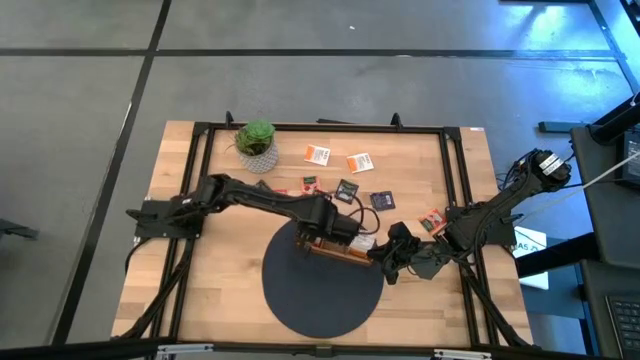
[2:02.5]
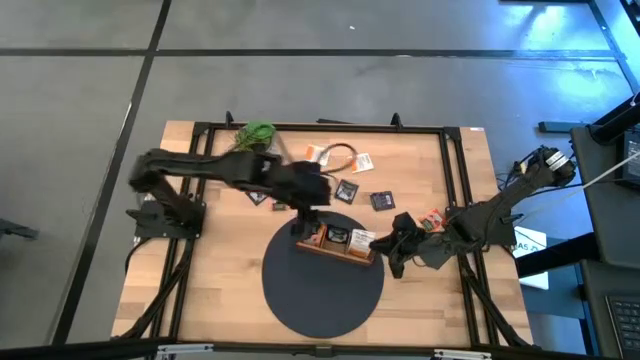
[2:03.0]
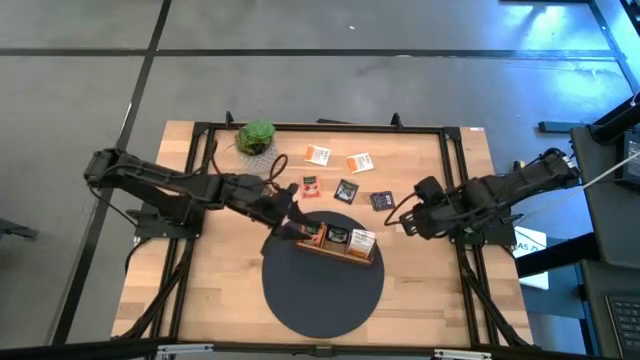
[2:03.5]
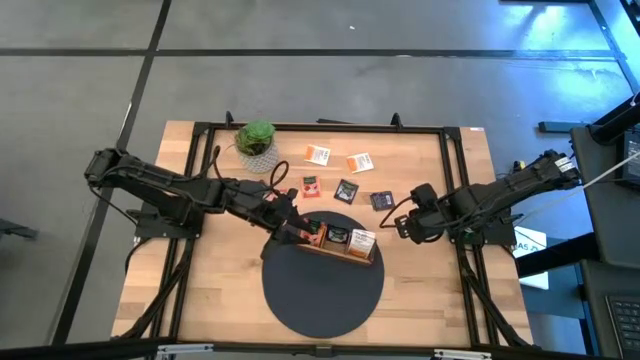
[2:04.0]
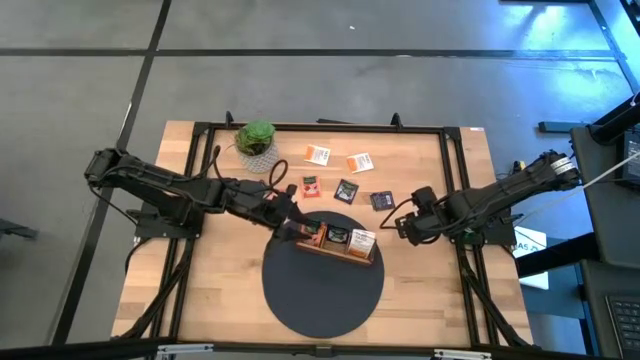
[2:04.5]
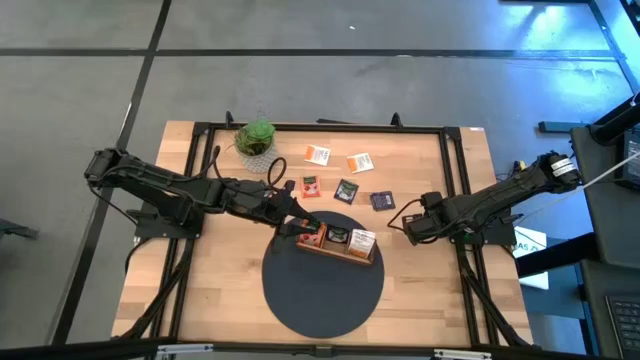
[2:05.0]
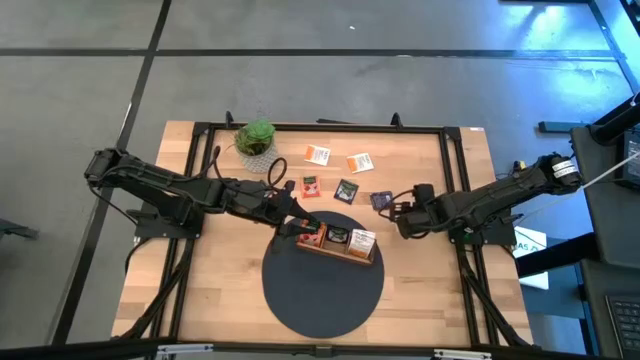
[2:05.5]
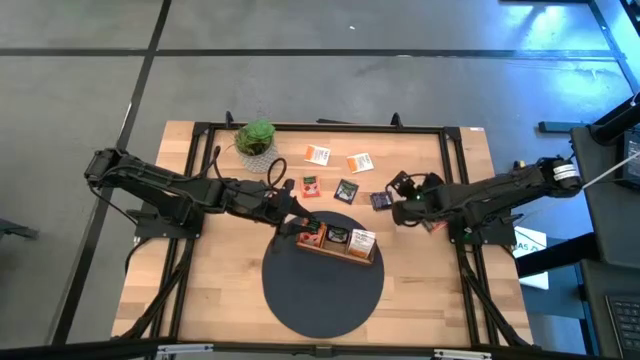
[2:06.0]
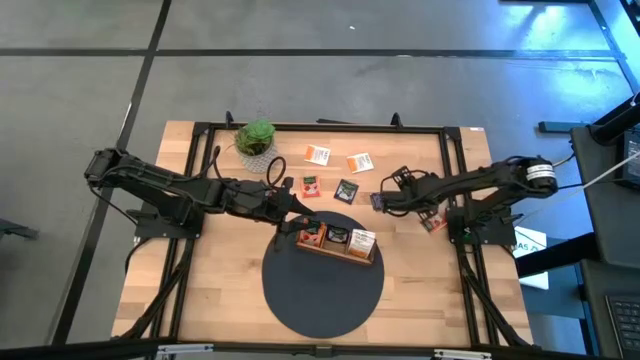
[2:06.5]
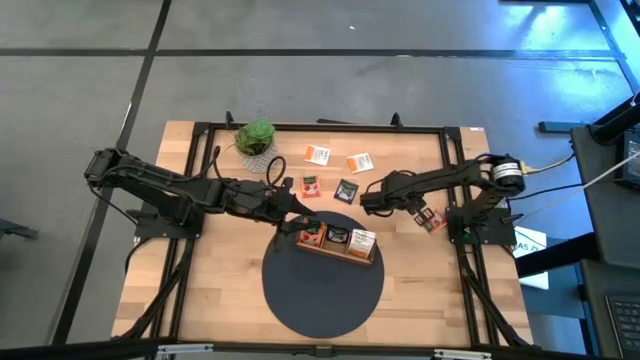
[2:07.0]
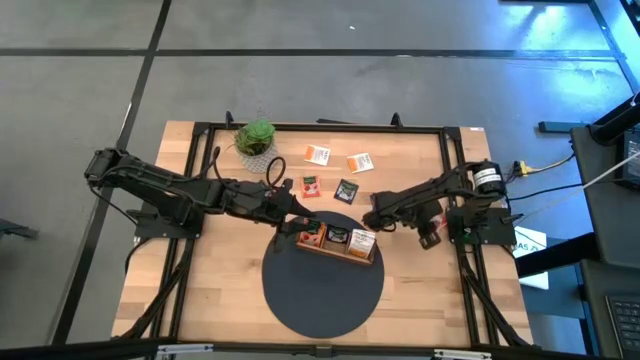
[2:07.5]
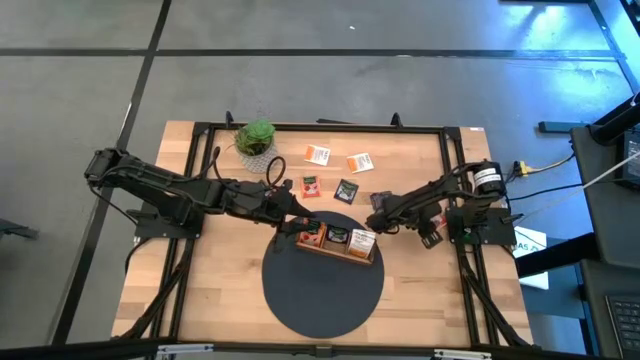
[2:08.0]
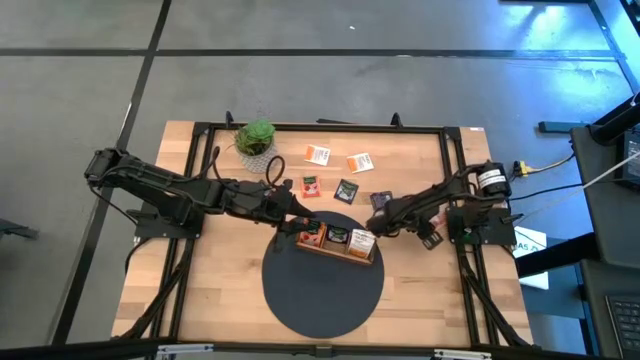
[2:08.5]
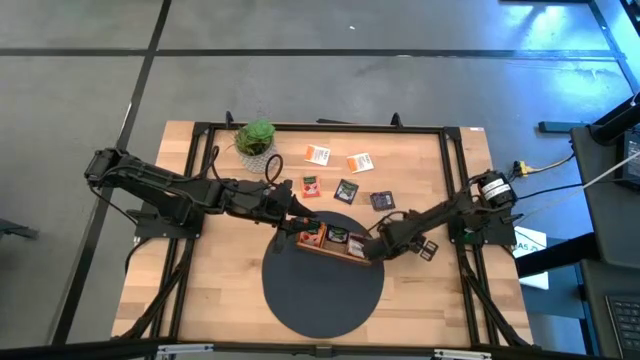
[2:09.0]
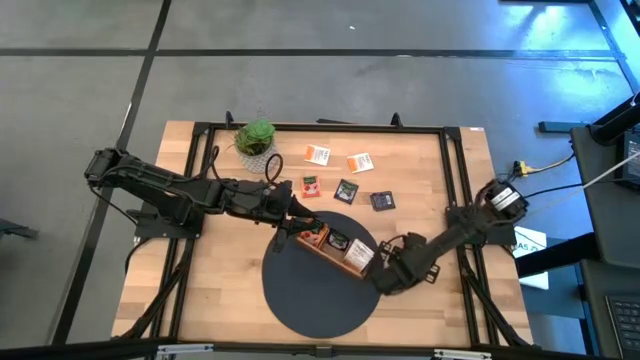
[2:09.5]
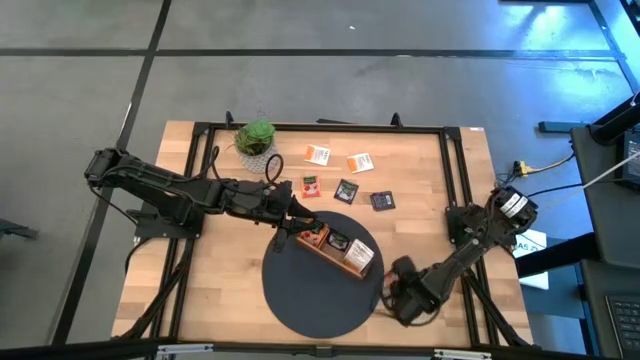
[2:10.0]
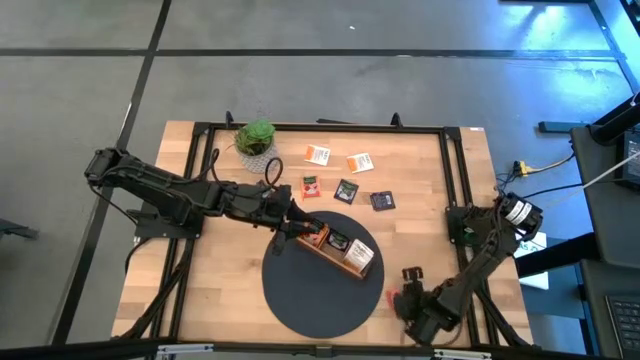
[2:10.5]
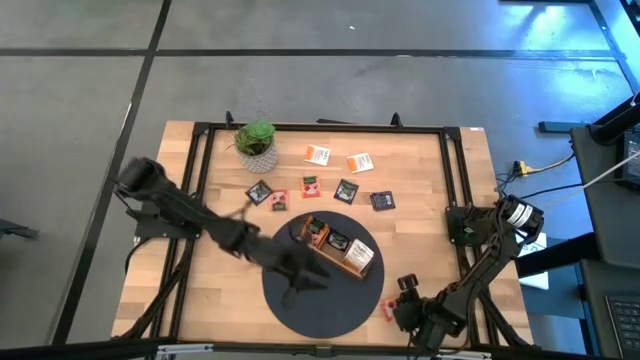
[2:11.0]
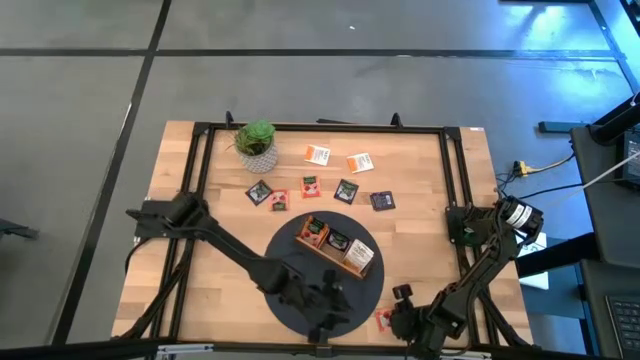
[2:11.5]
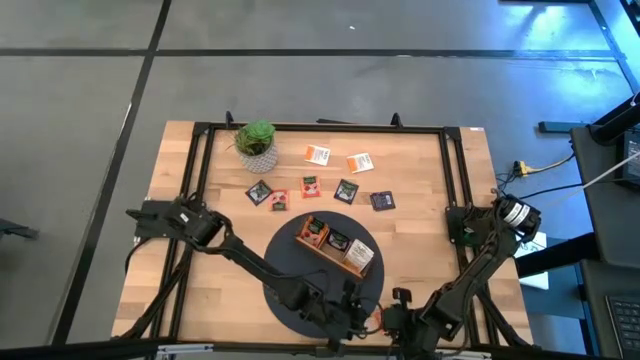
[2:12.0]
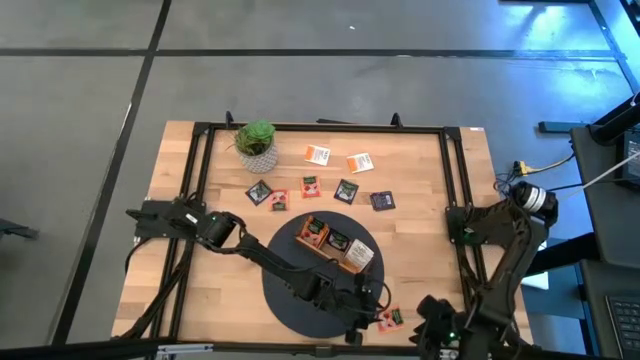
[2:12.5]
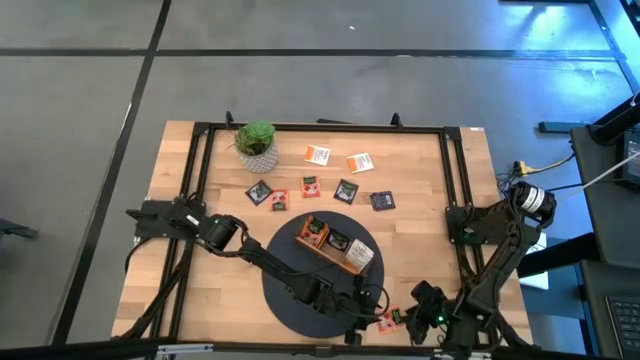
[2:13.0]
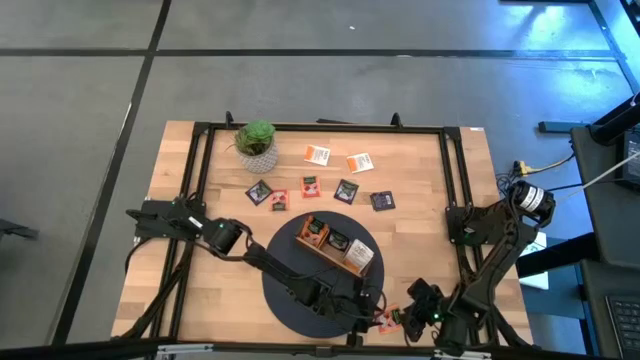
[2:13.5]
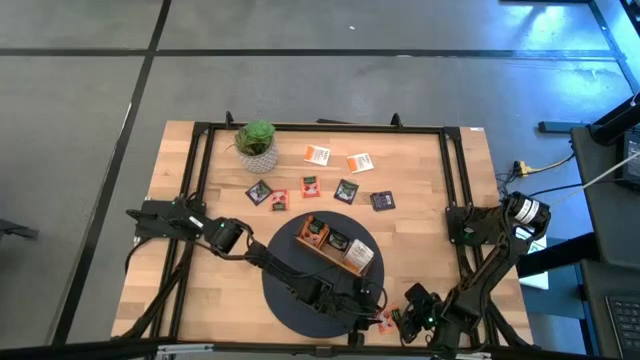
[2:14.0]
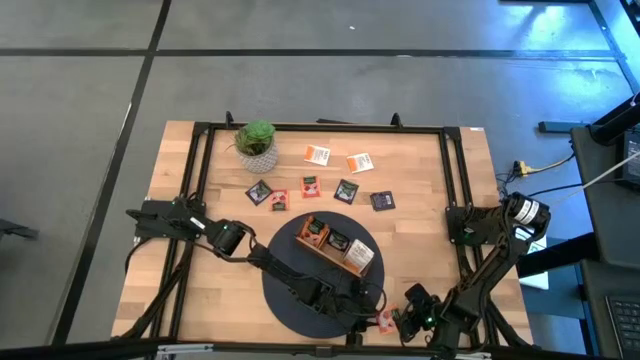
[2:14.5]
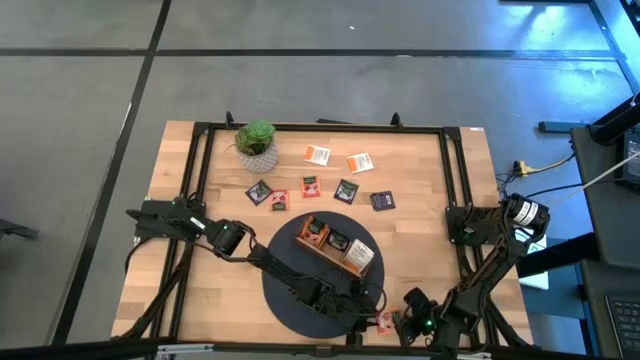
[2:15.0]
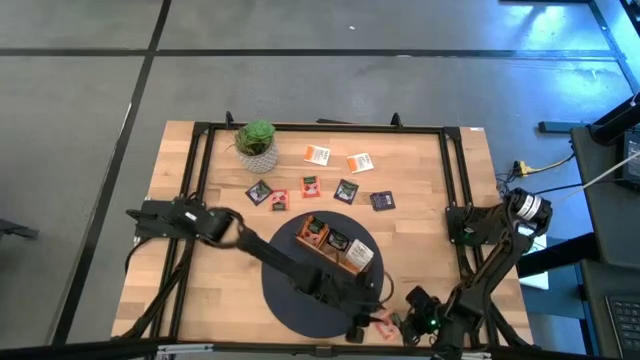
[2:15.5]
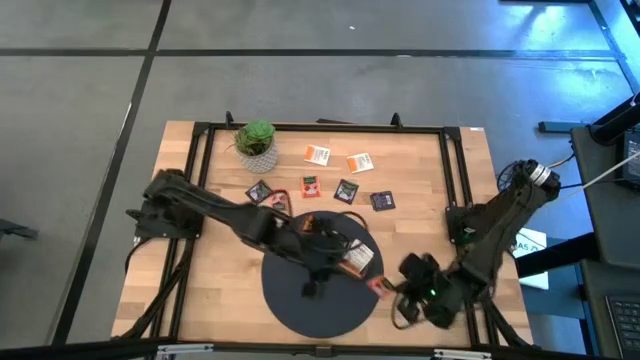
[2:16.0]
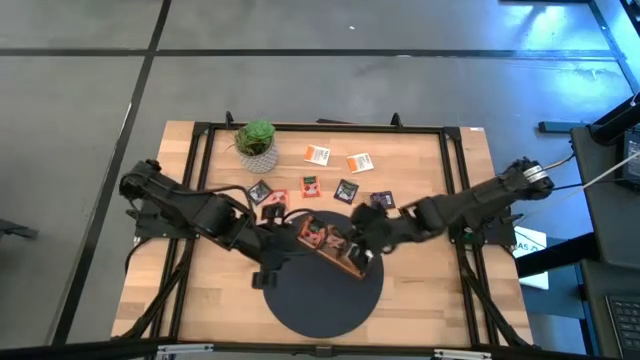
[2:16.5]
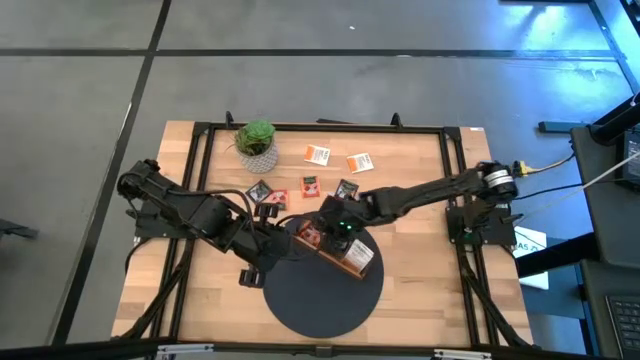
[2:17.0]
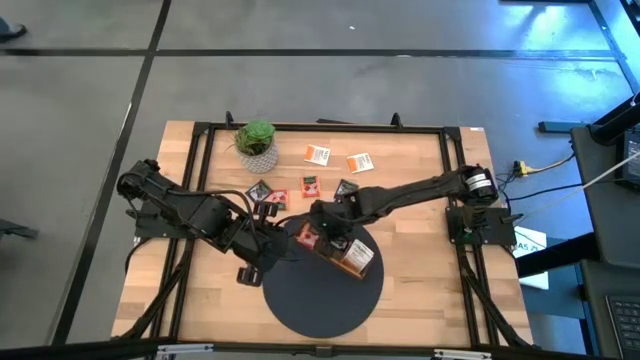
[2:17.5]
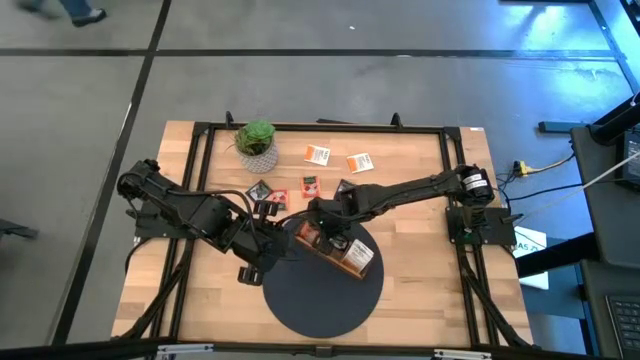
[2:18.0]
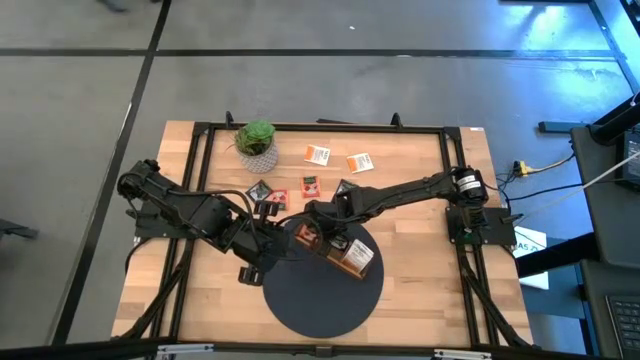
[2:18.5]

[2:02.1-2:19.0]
Task: Pick & Place Tea
Put the right orange tea bag into the left slot of the wooden organizer

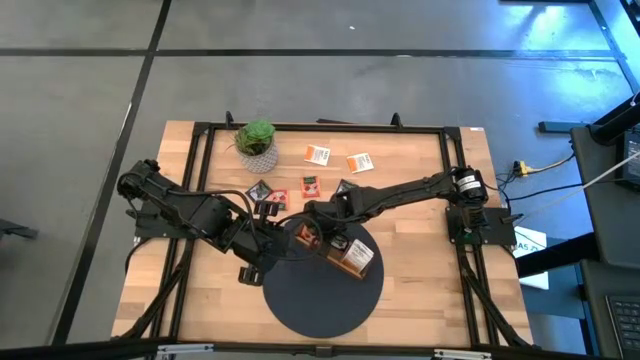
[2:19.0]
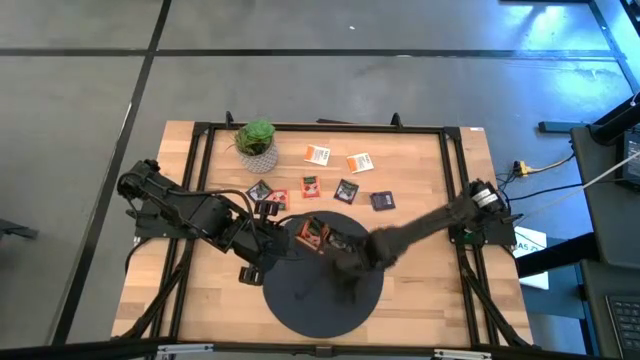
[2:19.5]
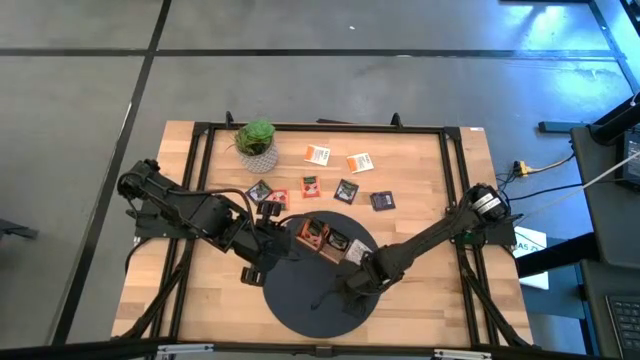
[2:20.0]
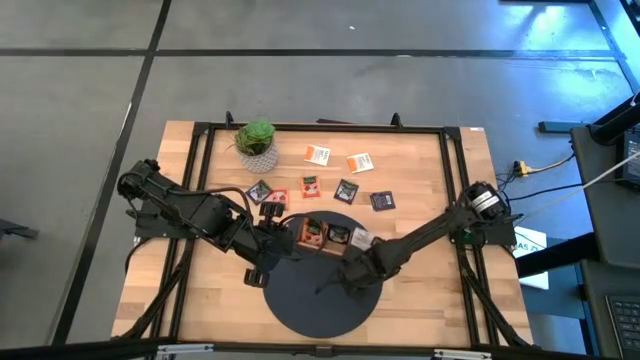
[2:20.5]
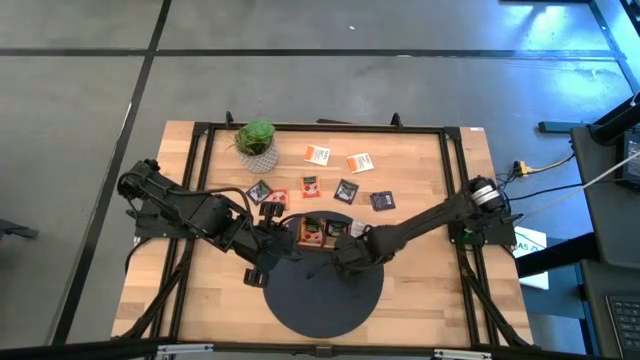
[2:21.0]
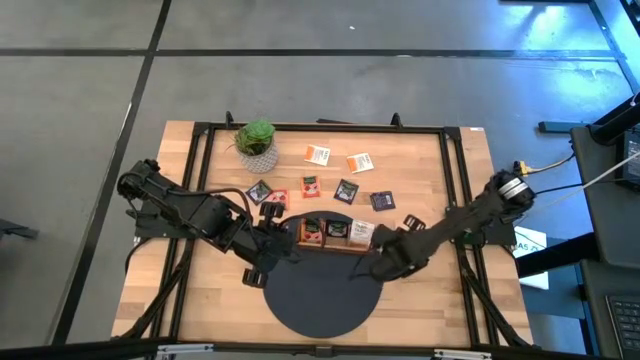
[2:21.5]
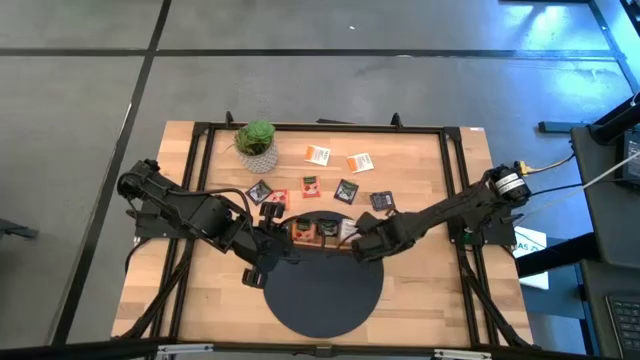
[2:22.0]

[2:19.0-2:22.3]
Adjust the wooden organizer on the mat

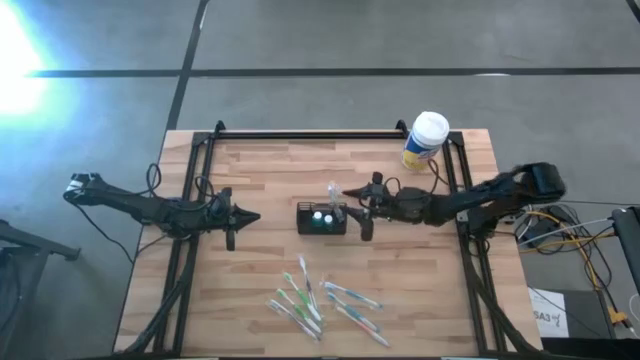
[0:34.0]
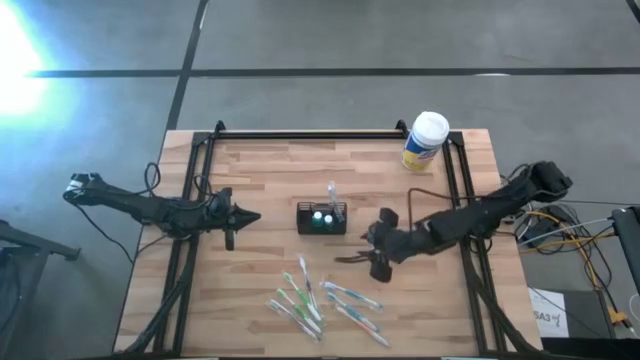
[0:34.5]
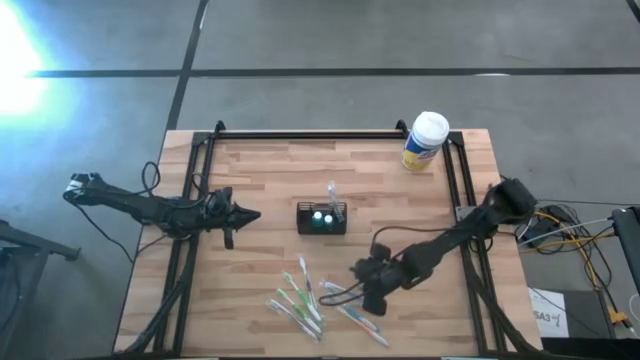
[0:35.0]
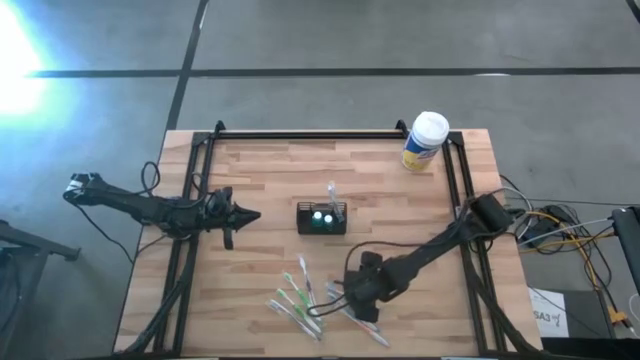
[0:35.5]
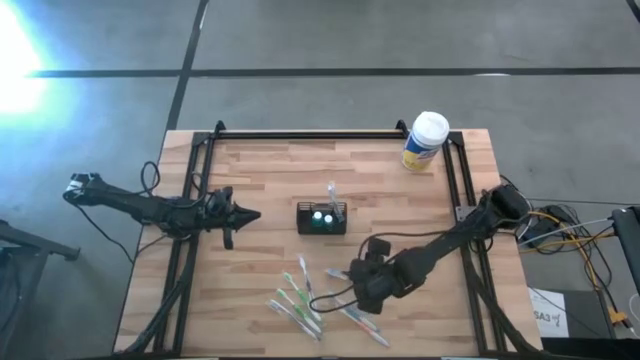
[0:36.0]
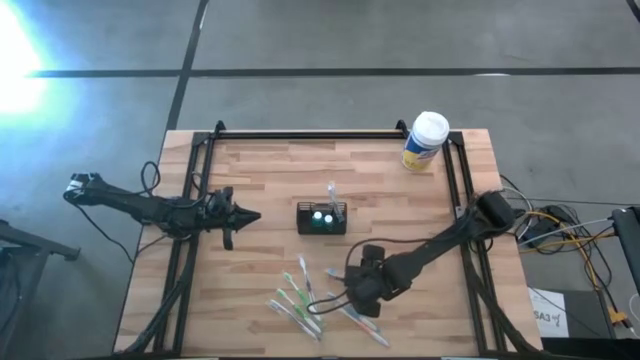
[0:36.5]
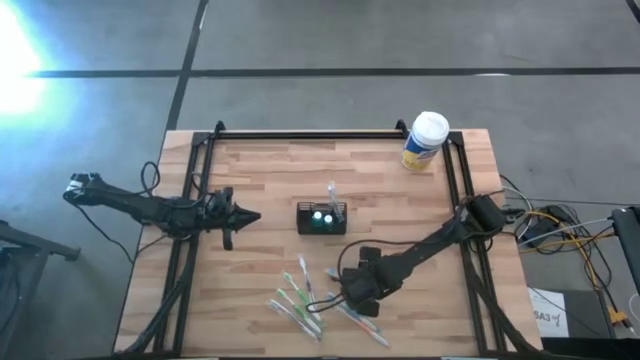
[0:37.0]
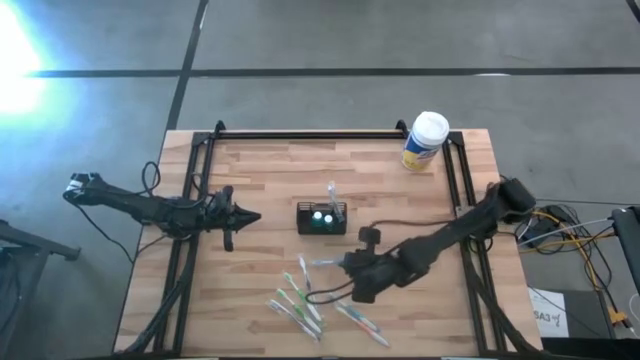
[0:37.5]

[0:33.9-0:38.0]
Task: Pick & Place toothbrushing station
Put the top blue toothbrush into the black mesh organizer
